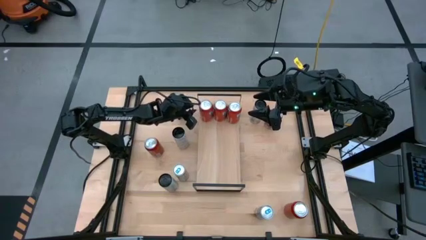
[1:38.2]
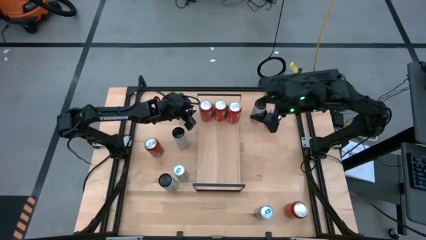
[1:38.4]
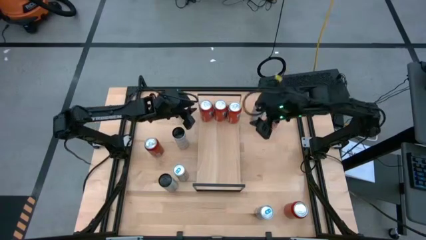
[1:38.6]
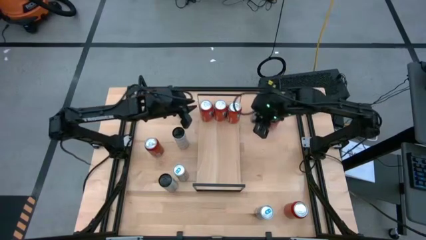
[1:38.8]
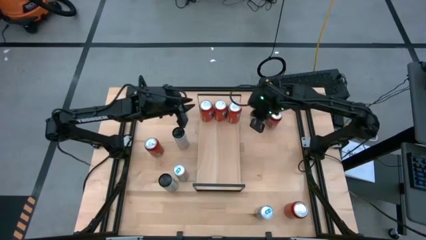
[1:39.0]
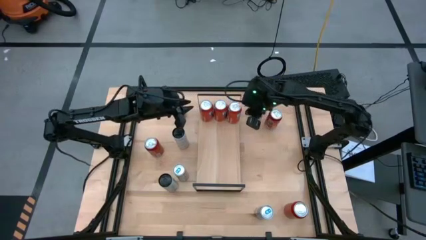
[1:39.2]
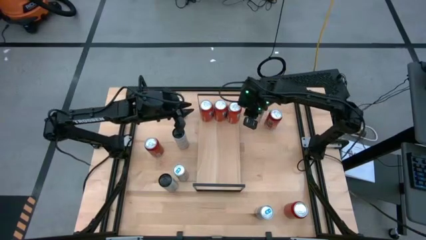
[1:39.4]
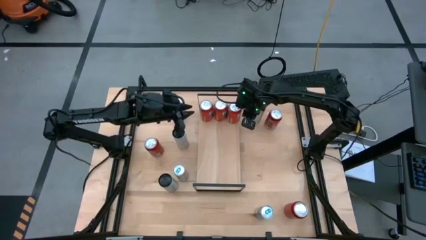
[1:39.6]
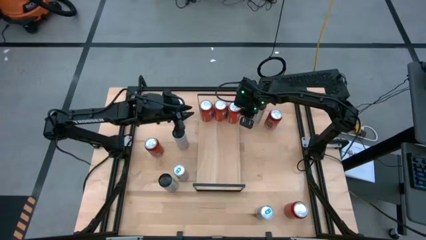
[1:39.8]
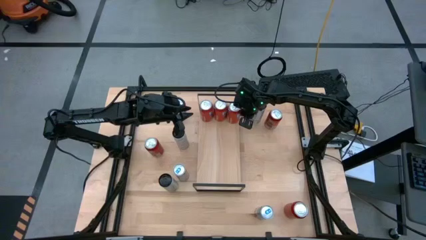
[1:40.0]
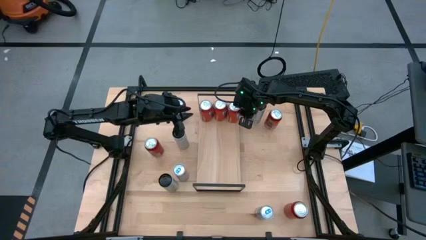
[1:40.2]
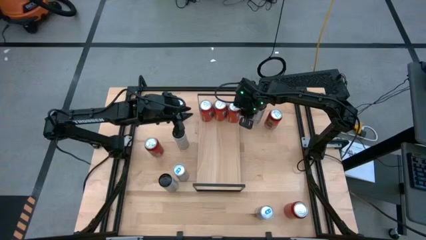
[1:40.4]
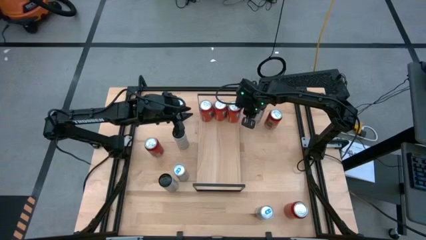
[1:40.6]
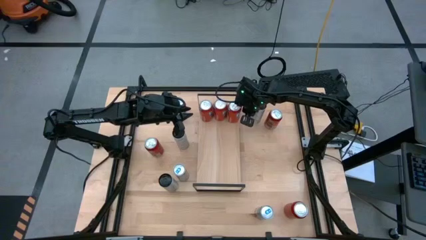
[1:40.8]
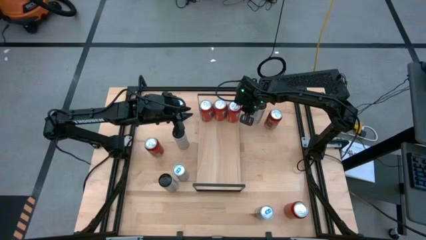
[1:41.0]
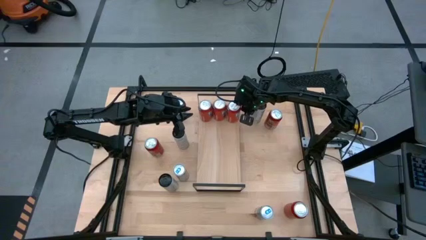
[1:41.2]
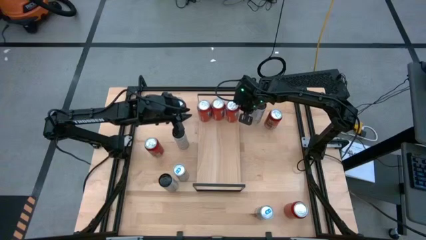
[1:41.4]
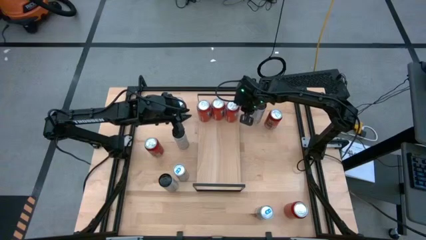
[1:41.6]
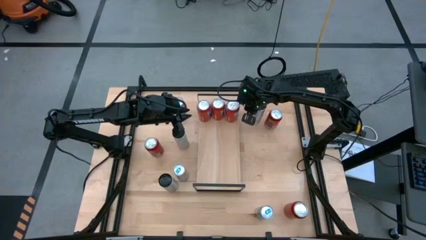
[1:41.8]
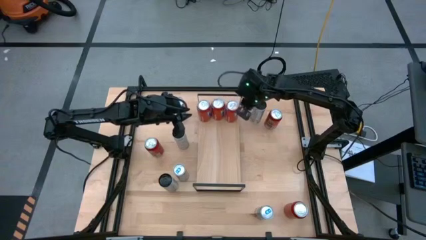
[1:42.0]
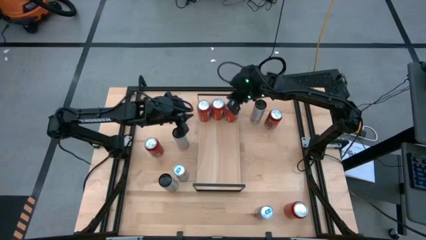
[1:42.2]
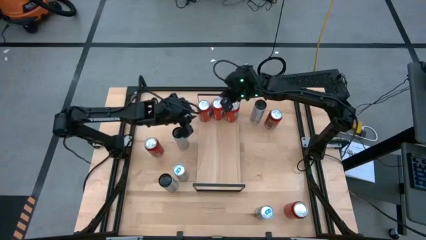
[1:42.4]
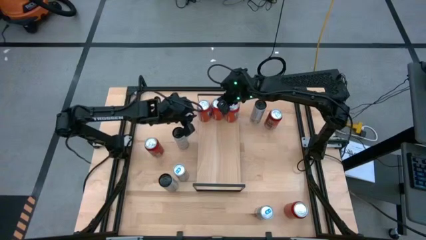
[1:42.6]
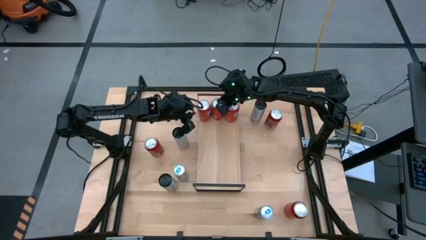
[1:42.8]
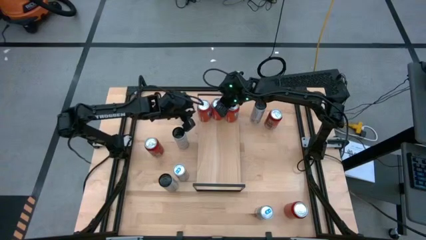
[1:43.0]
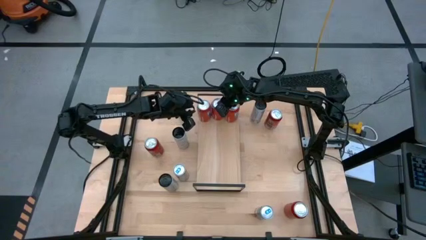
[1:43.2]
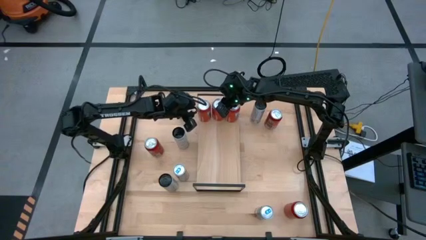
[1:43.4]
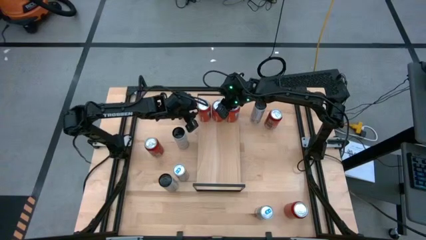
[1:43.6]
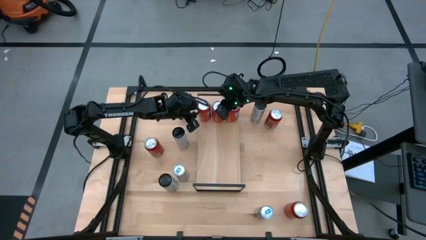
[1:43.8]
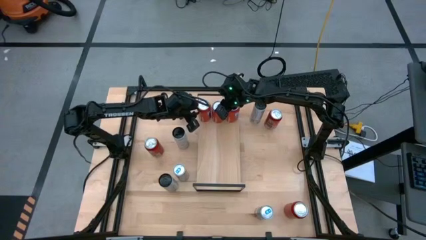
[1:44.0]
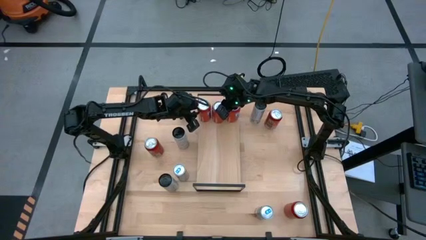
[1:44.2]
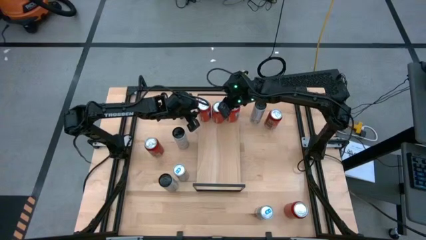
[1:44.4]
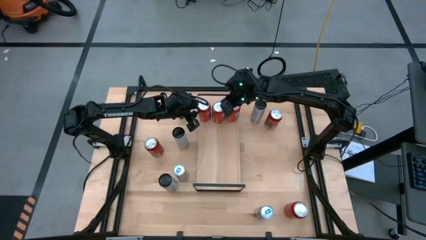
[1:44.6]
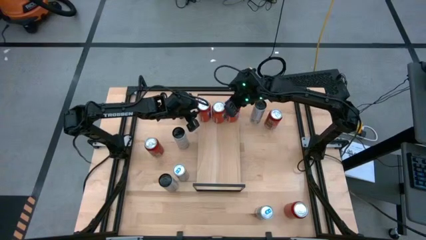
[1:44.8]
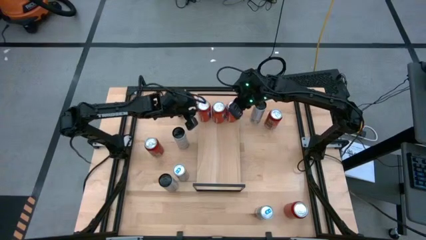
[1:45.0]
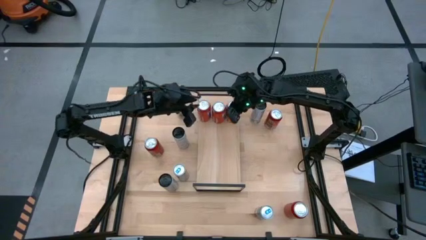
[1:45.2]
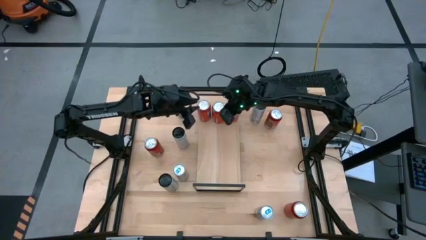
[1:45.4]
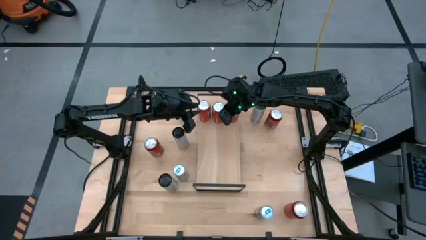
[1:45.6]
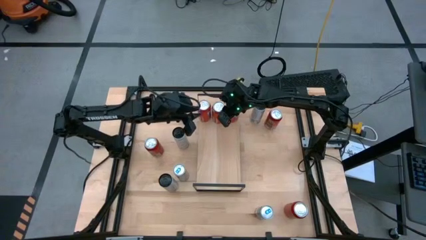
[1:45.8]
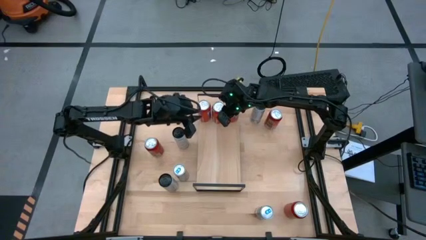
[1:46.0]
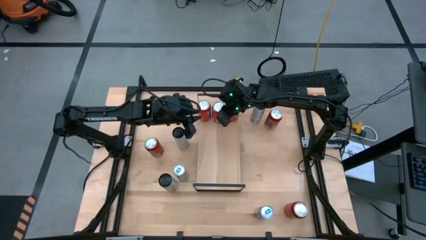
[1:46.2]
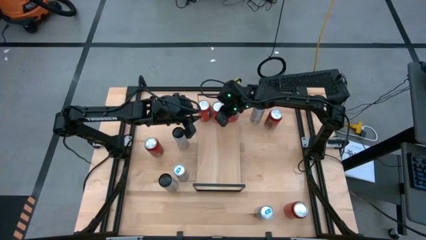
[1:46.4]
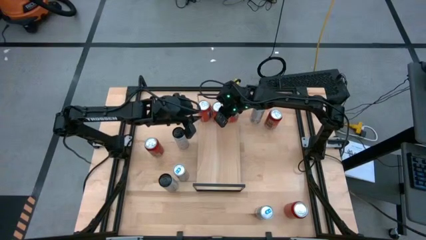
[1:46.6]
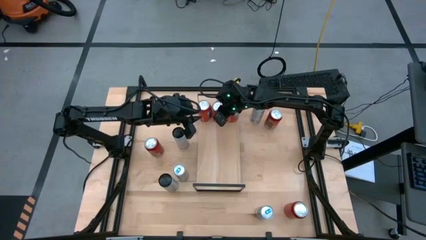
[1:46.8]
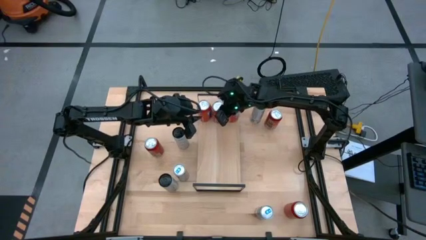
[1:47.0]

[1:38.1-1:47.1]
Task: Place canned beverage on shelf
Adjust the orange soda cans on the shelf

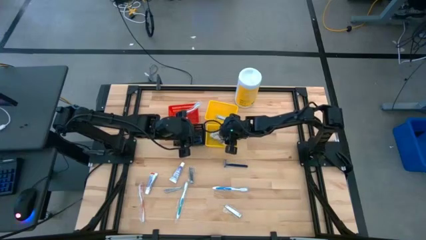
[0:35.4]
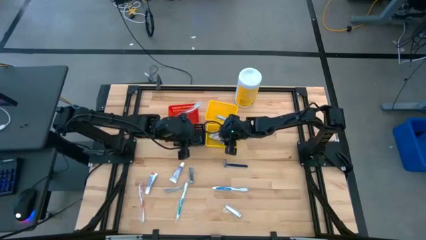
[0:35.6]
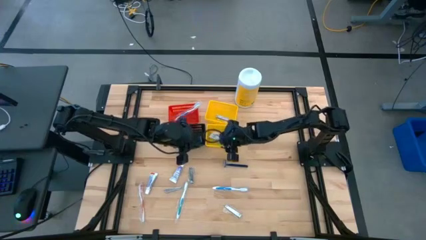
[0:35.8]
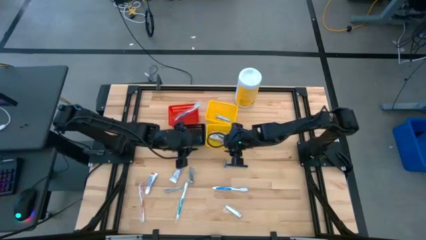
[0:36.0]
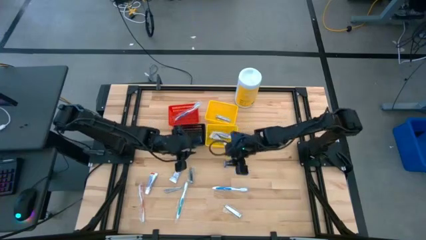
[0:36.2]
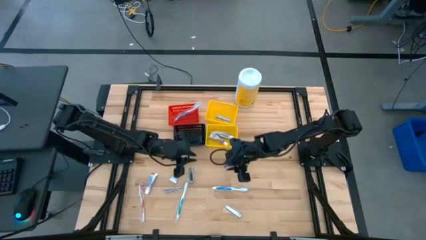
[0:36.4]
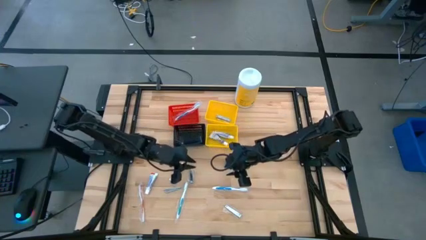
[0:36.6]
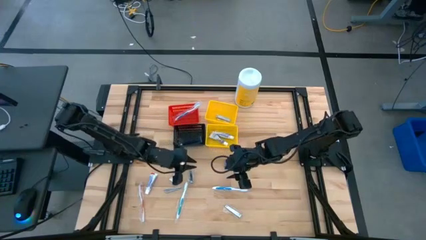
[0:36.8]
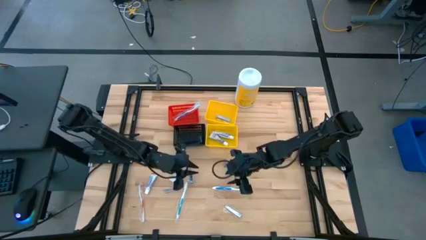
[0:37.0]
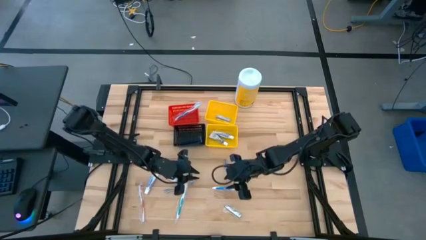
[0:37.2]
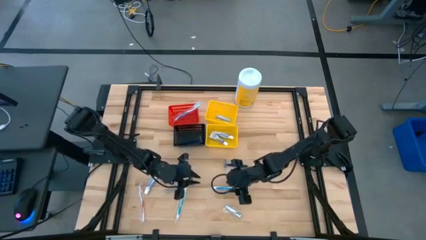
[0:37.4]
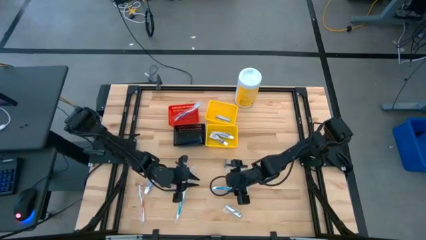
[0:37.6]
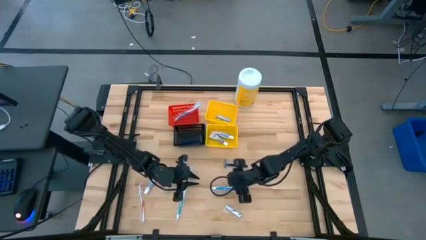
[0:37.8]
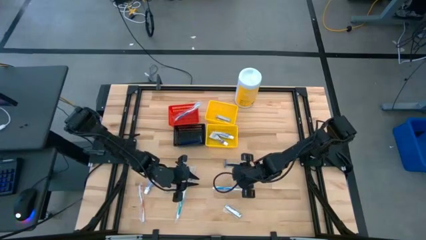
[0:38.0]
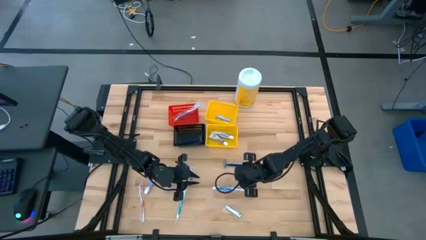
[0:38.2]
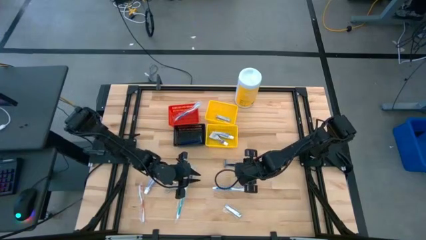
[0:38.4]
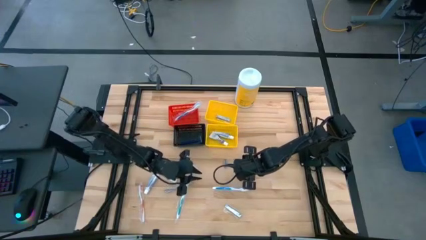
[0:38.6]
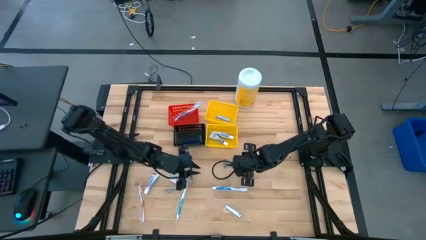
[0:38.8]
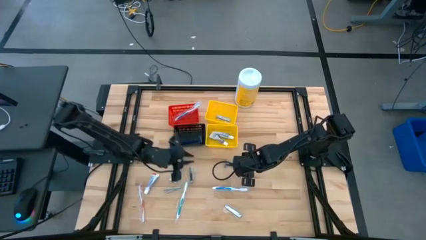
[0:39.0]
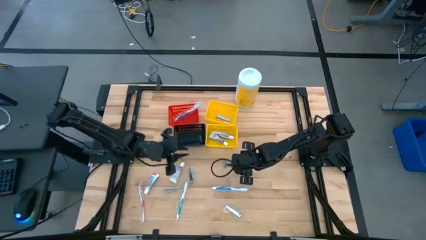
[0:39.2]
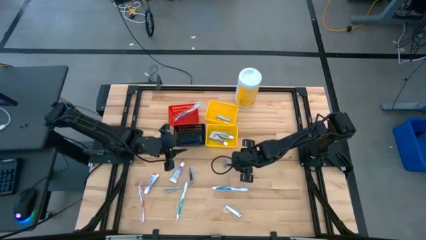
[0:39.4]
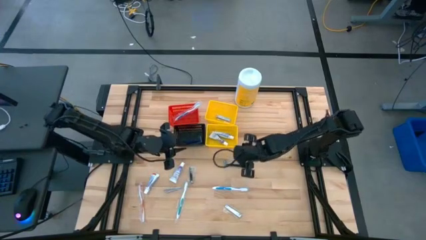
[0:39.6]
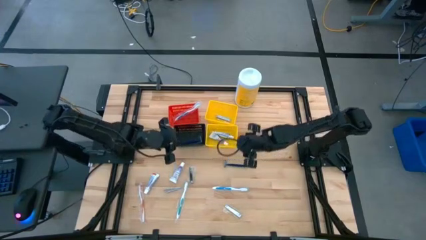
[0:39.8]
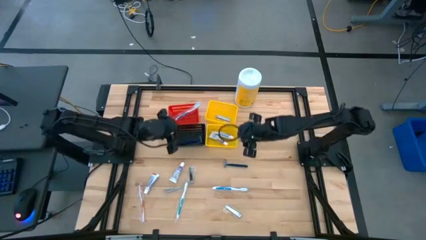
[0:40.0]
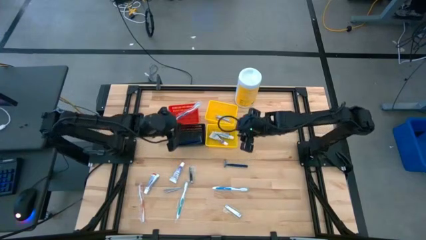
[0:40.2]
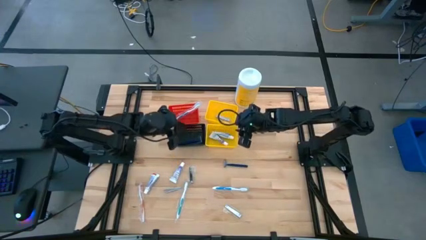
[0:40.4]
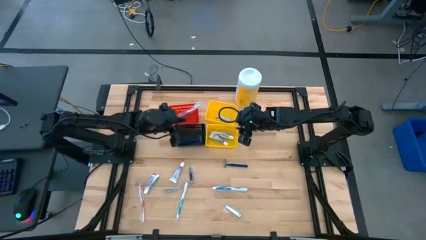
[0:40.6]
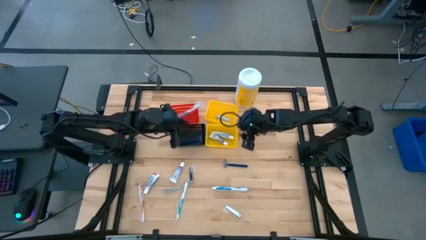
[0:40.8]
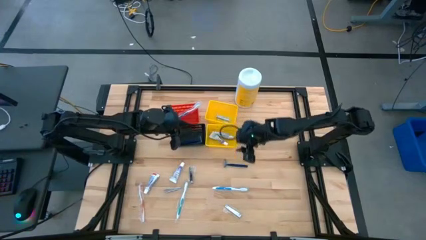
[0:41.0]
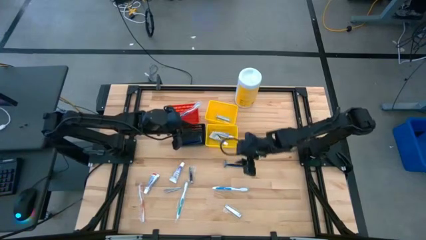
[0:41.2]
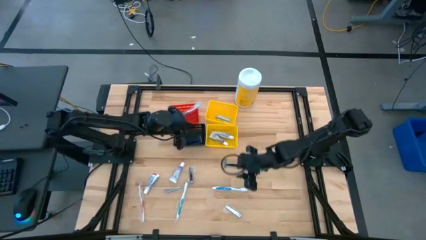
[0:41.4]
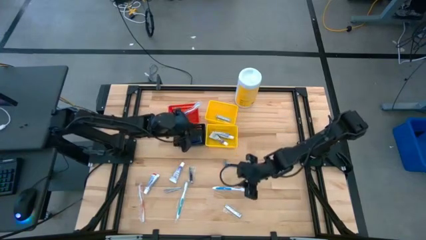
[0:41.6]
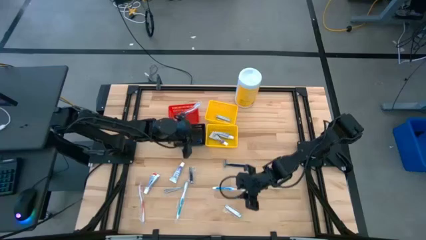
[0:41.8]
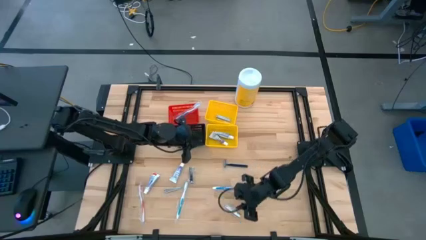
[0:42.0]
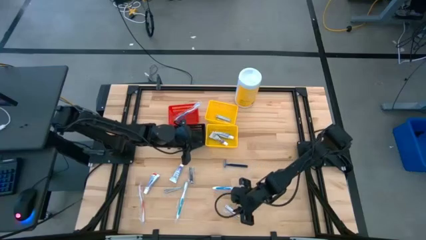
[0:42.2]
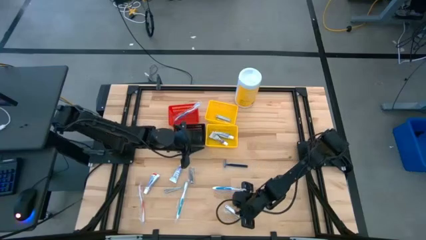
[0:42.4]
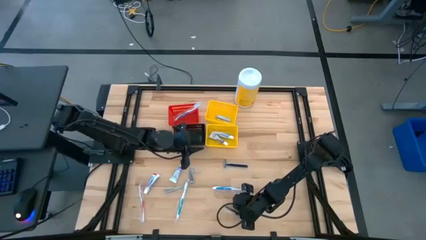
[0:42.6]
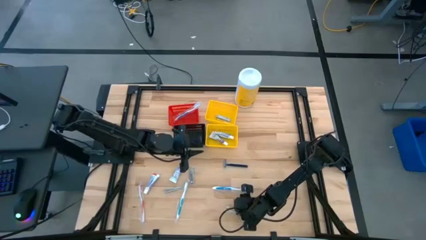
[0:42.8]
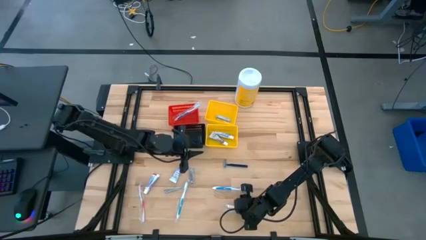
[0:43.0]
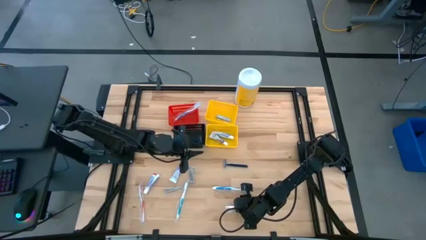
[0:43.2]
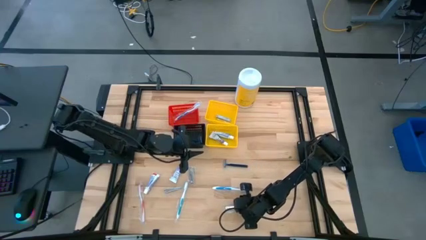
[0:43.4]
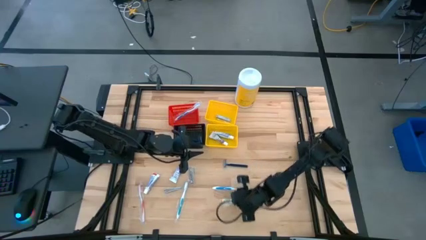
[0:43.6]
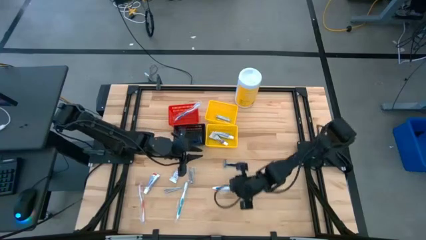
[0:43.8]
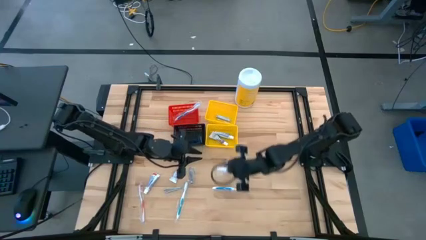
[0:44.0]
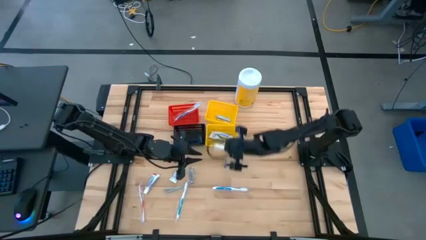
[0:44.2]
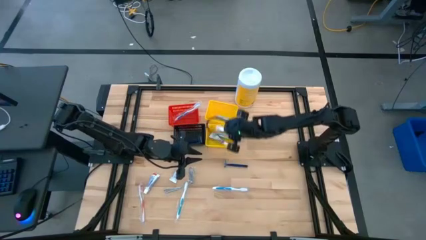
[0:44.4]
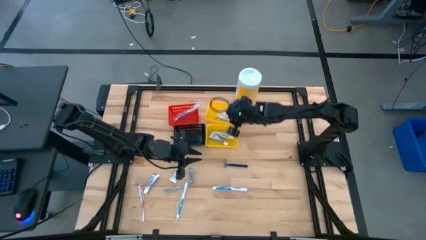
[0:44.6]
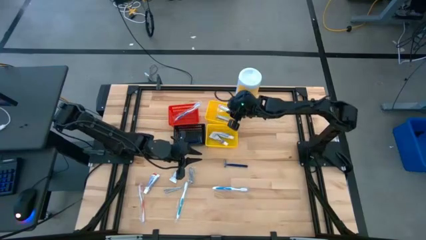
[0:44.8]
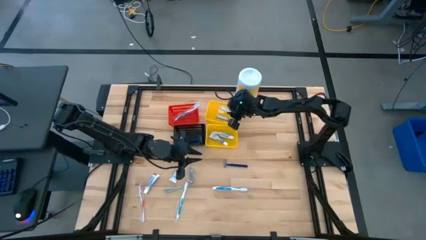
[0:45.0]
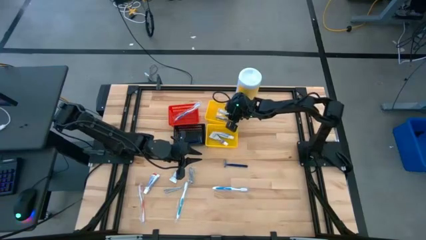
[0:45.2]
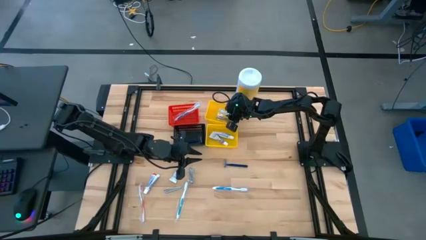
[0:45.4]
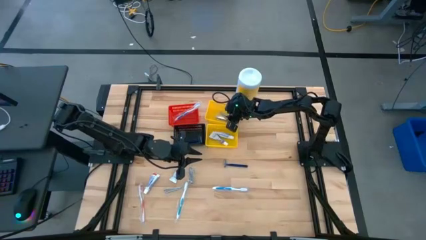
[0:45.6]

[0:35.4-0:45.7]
Task: Pick & Place Travel size toiletries
Put the silver nail cutter into the top yellow bin
